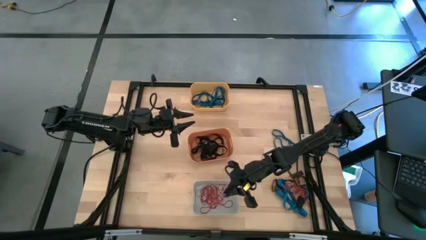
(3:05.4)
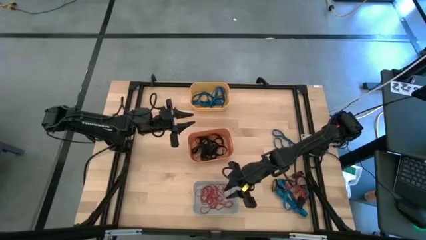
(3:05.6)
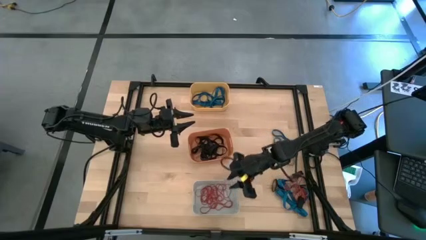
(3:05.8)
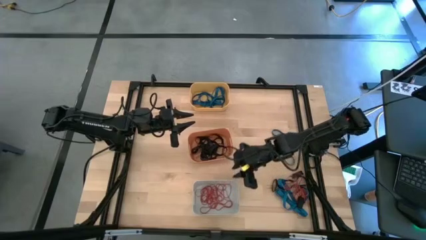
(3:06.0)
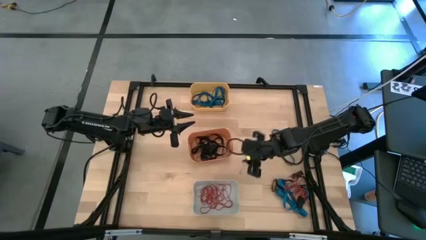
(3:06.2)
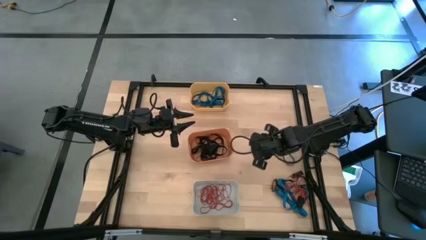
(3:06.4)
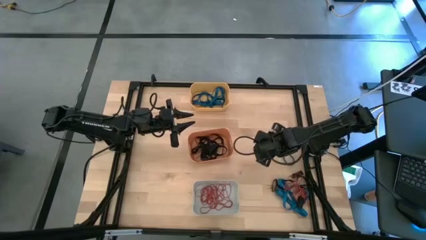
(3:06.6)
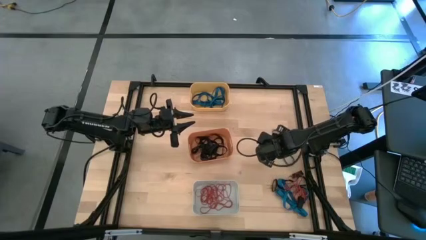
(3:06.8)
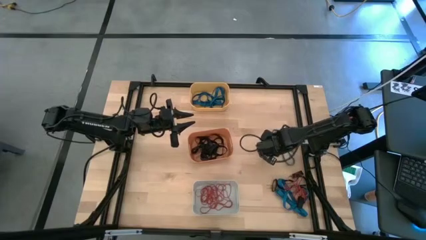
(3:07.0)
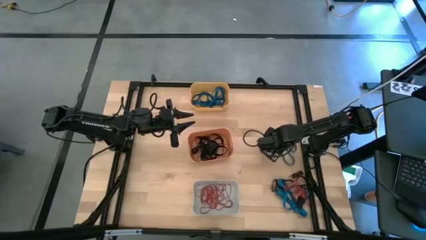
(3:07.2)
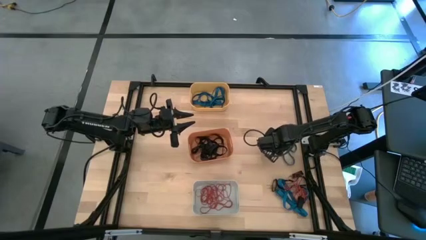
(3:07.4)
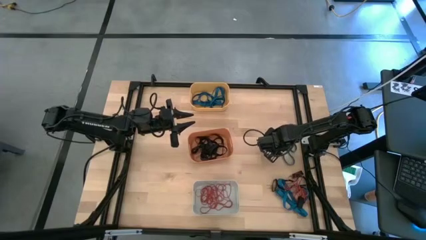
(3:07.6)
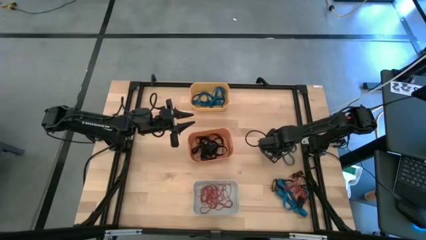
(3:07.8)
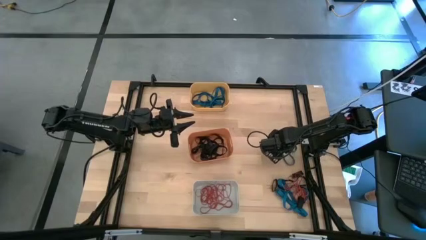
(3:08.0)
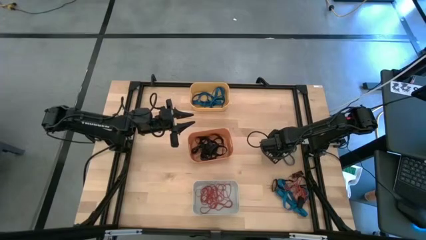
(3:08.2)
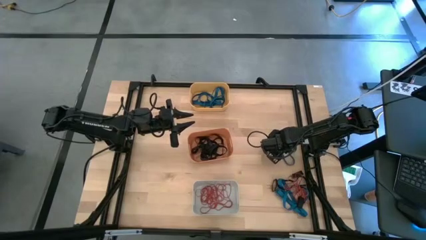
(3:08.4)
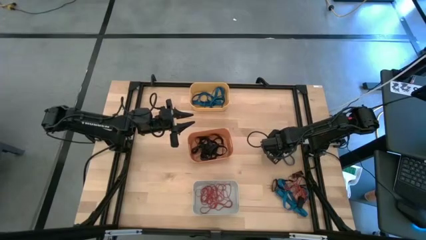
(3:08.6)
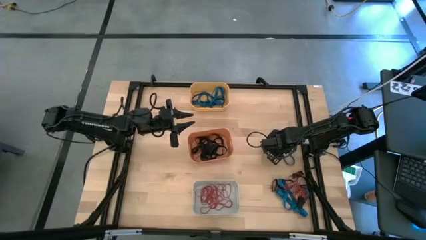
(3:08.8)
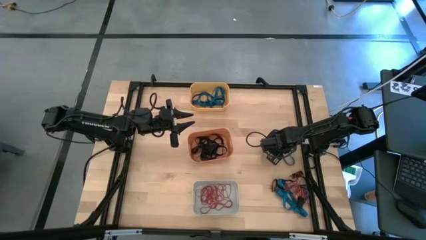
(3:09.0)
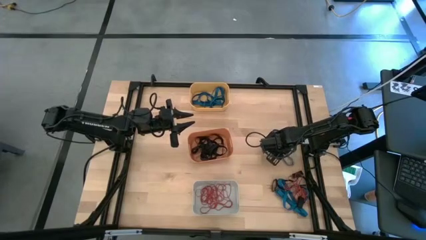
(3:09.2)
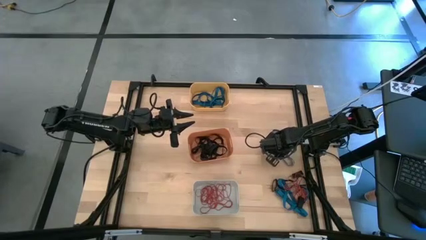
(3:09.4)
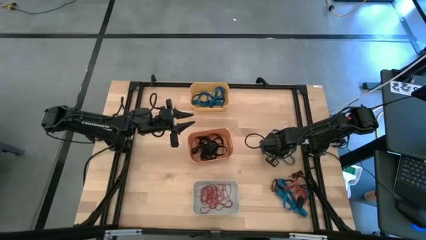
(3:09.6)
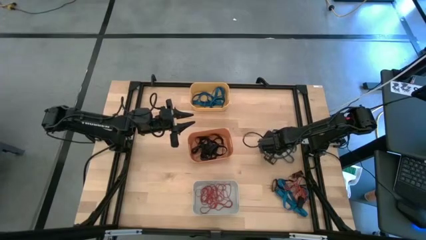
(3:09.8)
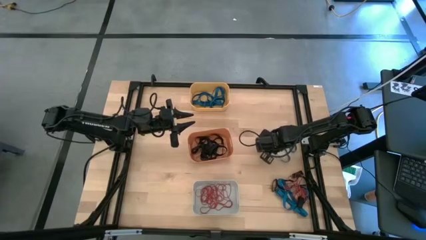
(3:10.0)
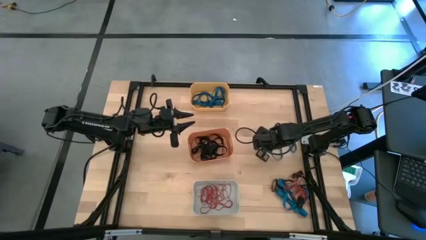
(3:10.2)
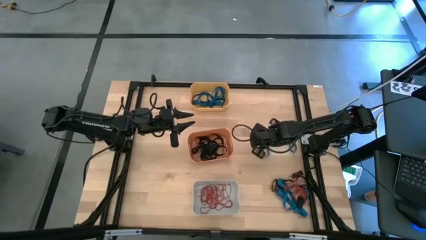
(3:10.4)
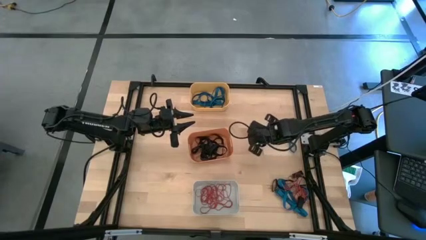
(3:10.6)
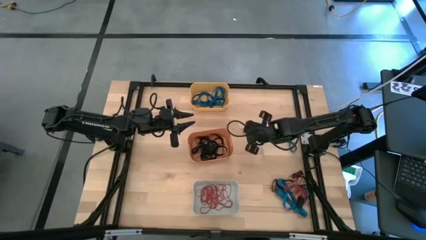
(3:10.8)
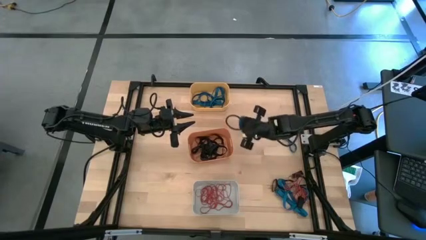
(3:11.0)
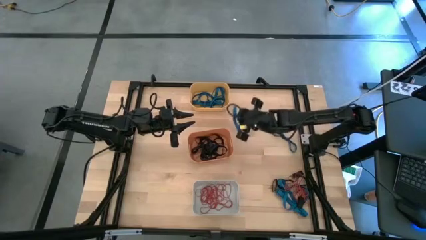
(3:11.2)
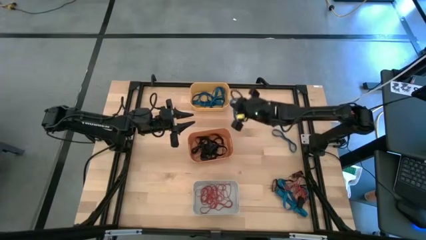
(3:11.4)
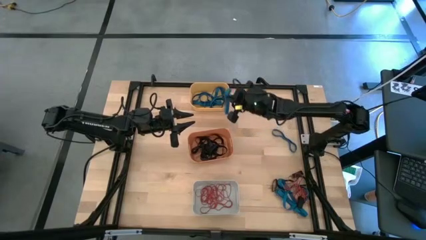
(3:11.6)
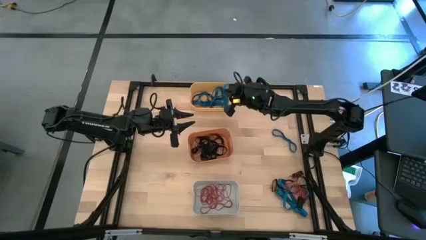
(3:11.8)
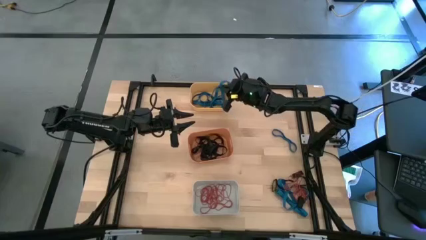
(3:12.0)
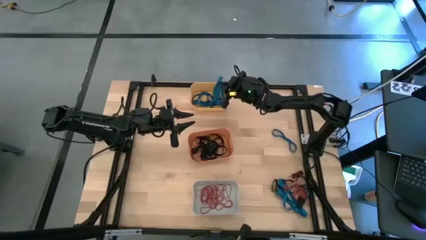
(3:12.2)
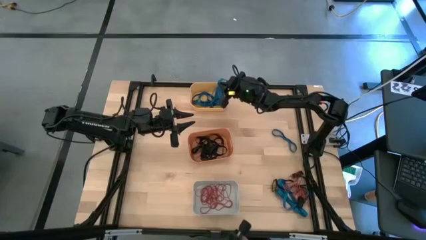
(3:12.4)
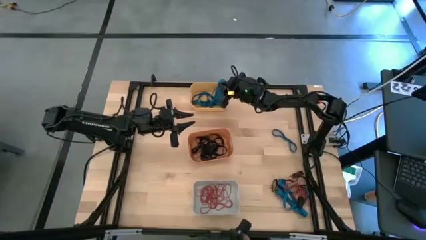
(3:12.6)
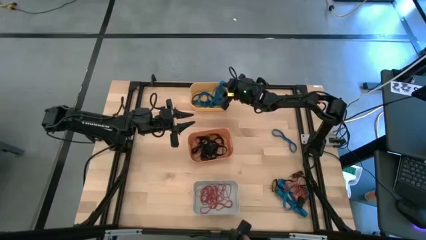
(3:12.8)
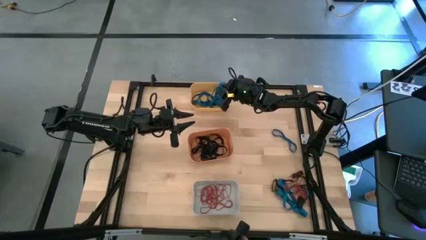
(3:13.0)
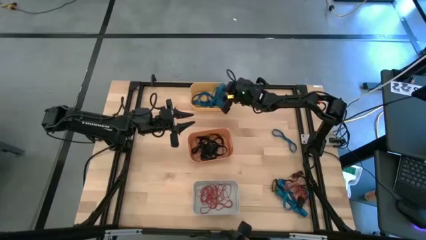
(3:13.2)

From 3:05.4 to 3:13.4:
Task: Sort rubber bands into baskets
Put the blue rubber band in the yellow bin

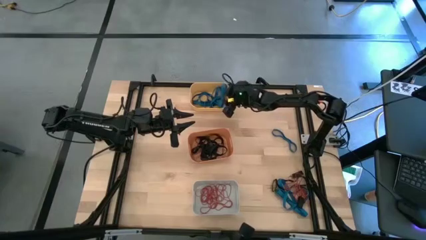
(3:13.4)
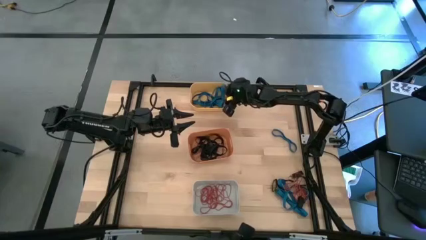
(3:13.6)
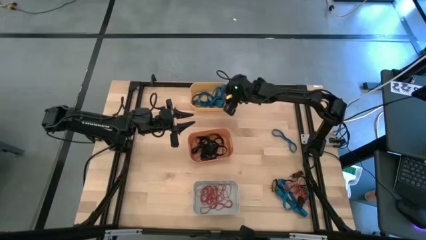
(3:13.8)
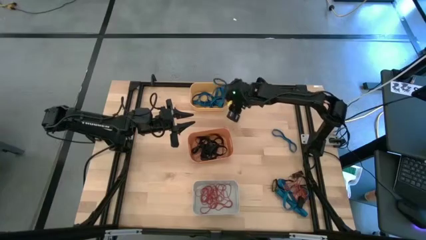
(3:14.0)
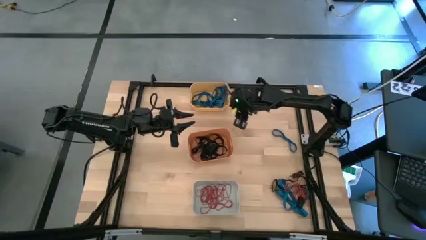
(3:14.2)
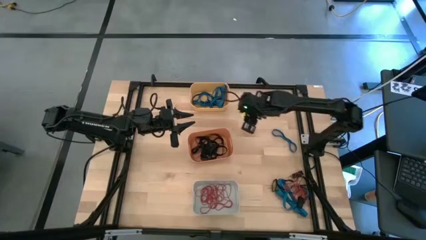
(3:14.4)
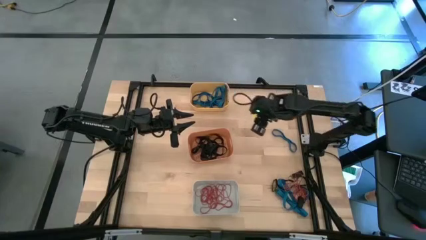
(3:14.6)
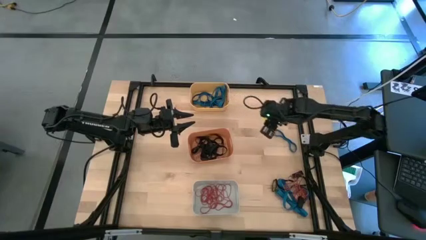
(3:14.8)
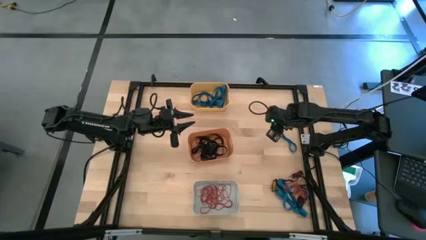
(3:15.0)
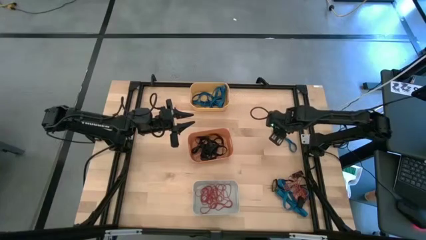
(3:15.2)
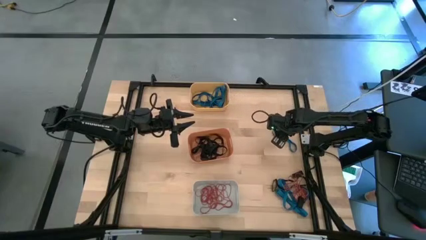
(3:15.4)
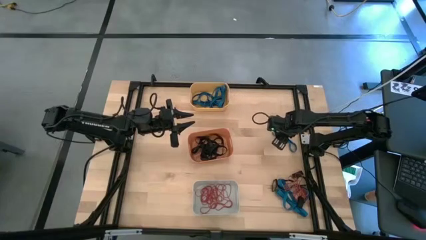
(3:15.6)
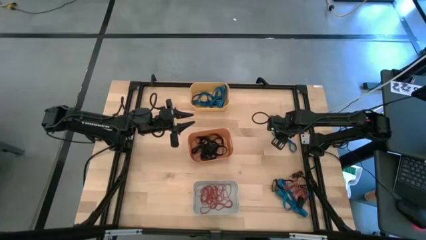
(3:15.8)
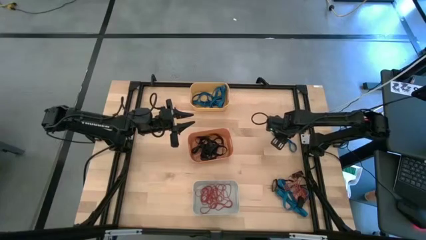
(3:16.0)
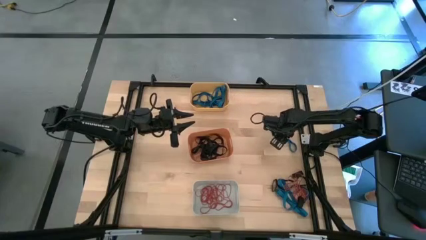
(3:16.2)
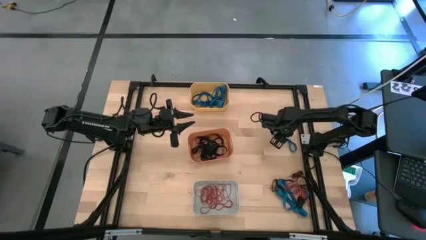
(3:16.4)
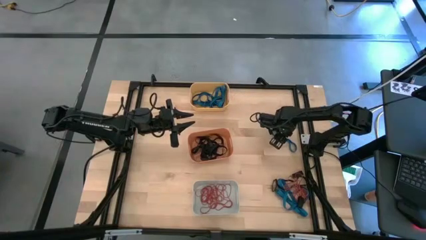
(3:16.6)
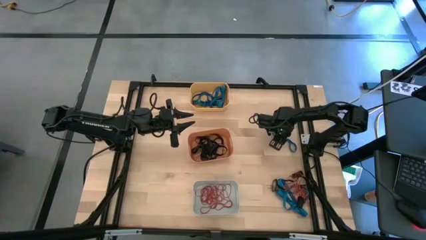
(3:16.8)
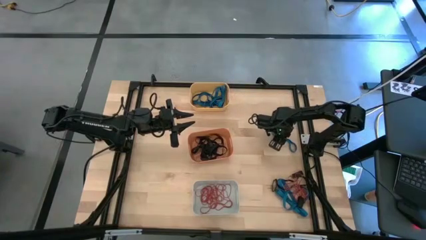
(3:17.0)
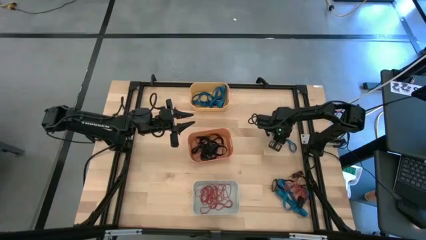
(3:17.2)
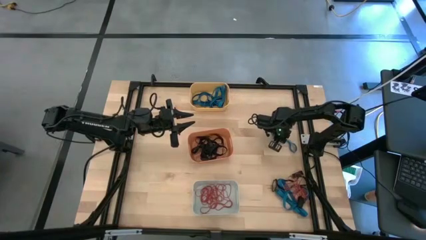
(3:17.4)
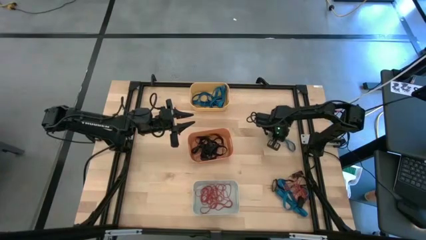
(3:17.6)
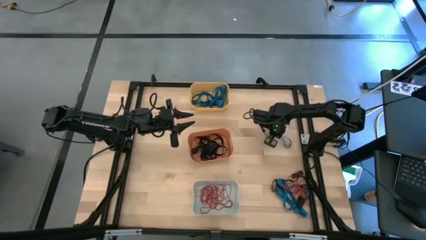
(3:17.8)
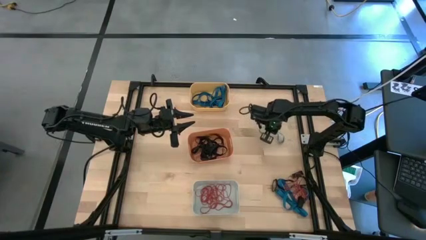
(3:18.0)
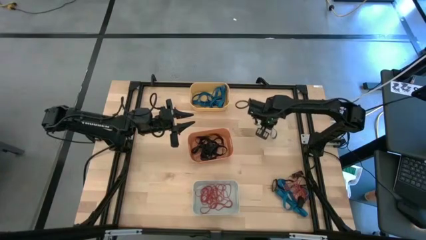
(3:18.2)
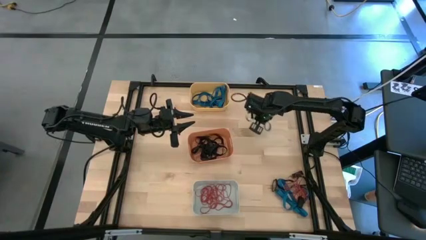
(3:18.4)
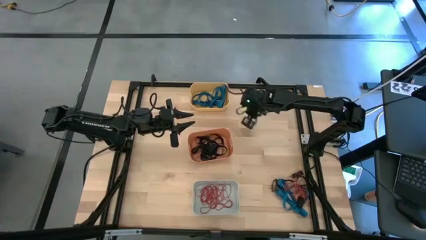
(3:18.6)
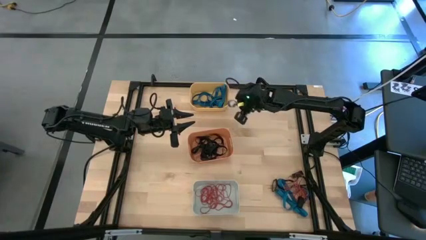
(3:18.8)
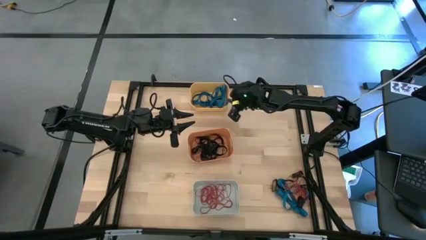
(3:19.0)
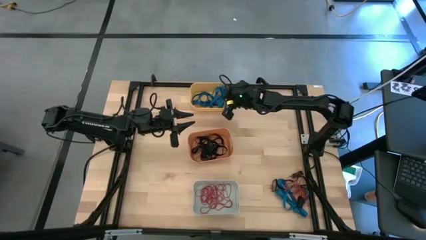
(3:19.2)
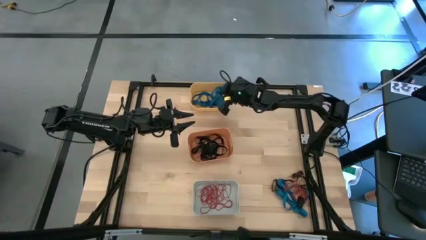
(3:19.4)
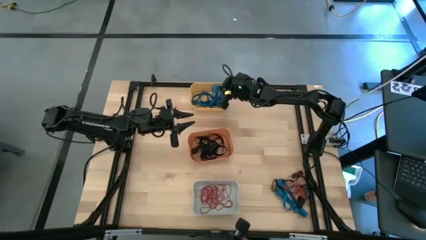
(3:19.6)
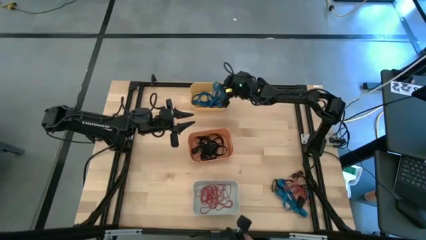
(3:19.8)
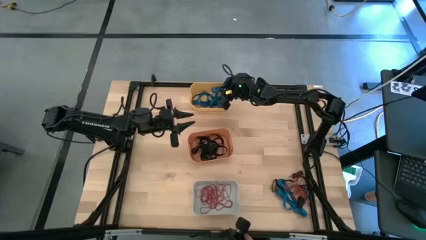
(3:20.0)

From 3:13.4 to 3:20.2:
Put the blue rubber band in the yellow bin

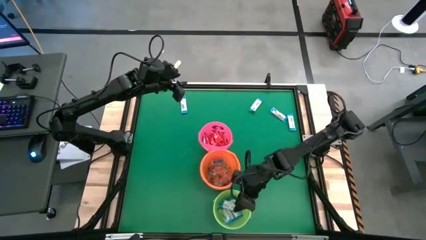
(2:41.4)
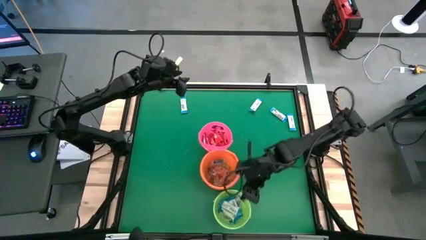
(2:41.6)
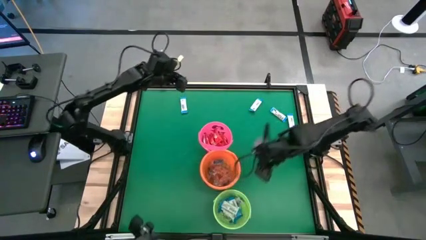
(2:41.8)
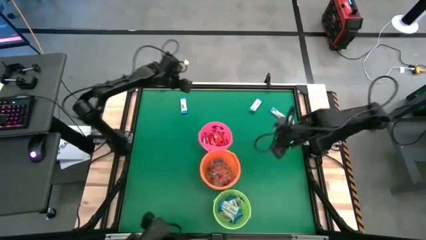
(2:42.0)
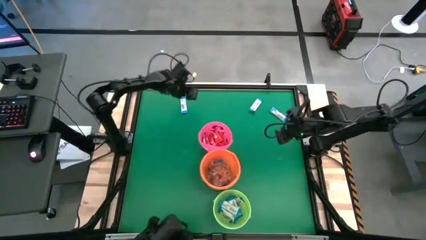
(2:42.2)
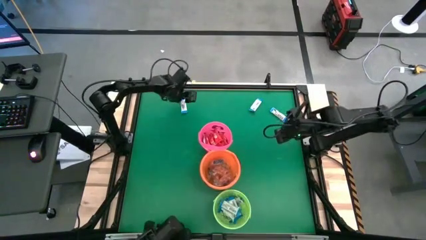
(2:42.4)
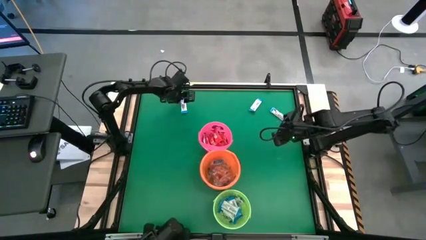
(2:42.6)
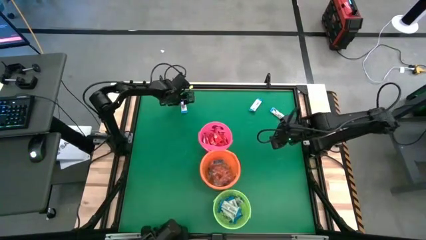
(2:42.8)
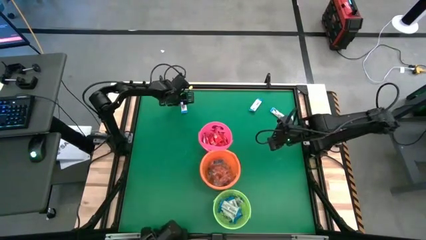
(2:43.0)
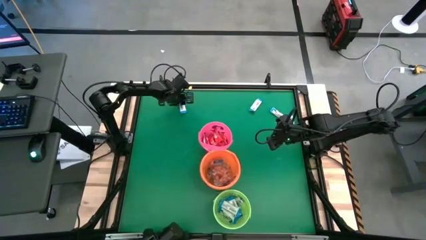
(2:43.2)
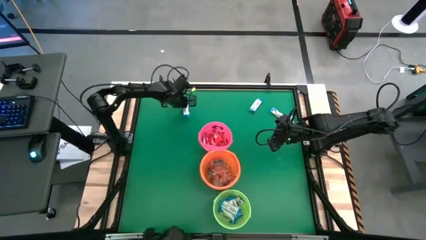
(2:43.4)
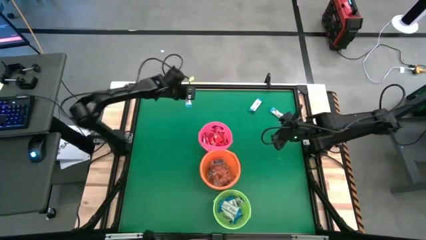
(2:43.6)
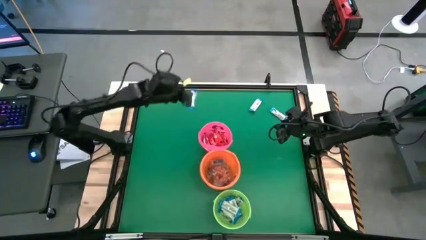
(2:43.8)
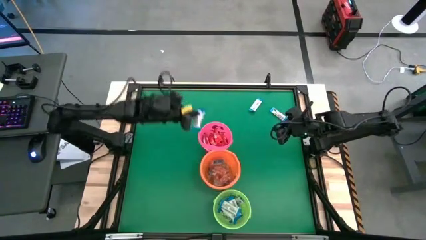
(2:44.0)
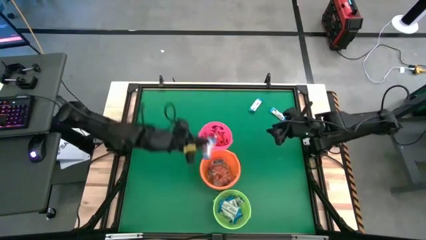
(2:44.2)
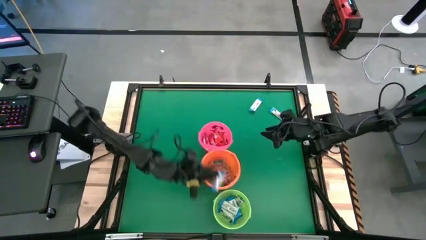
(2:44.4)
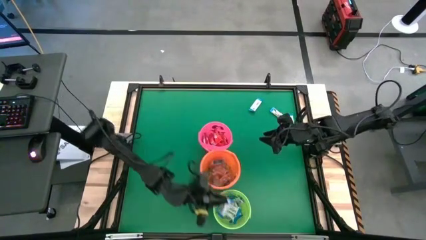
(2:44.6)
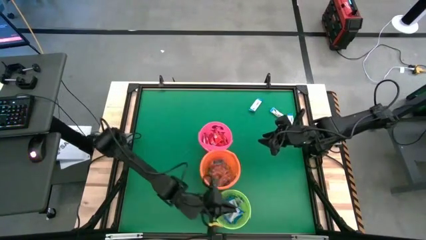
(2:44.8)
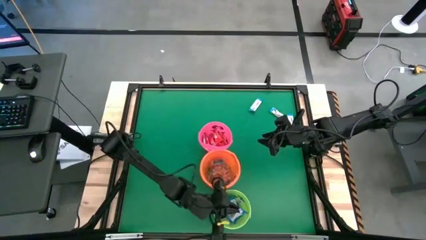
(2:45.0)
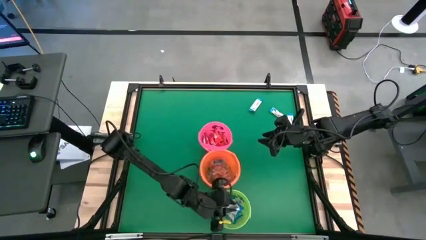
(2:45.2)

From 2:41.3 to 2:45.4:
Task: Sort candy by brand, put in halloween buckets
Put the white chocolate into the green bucket
